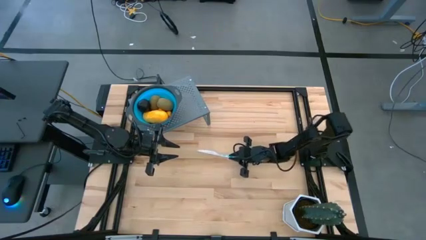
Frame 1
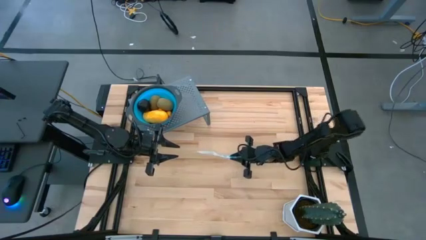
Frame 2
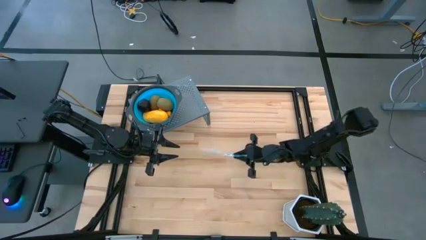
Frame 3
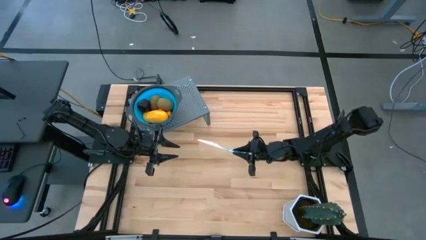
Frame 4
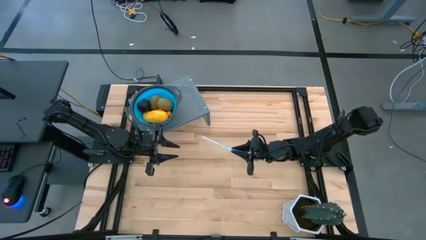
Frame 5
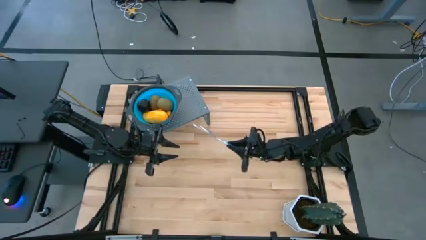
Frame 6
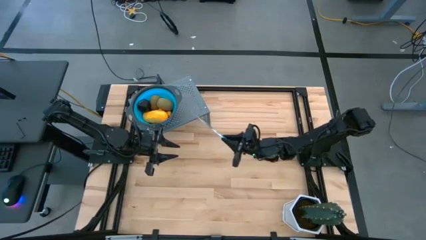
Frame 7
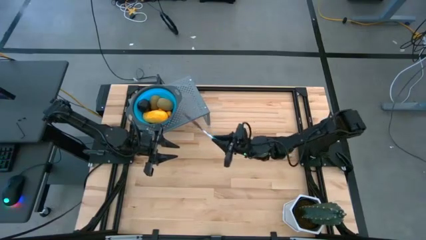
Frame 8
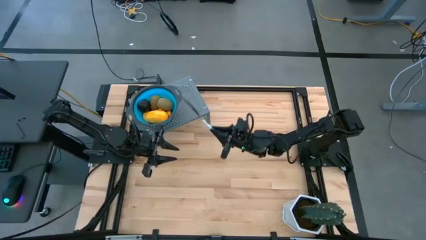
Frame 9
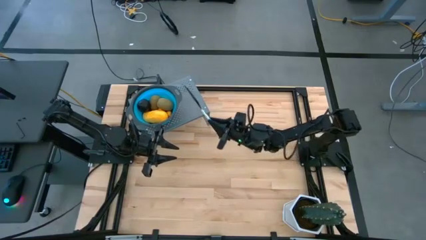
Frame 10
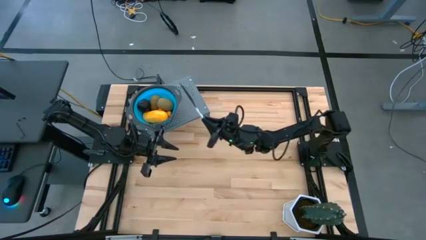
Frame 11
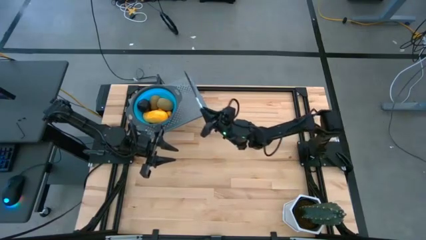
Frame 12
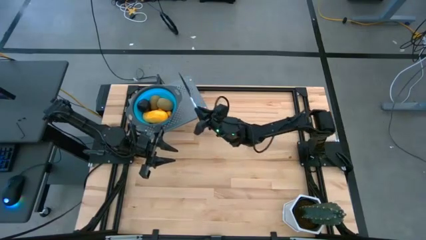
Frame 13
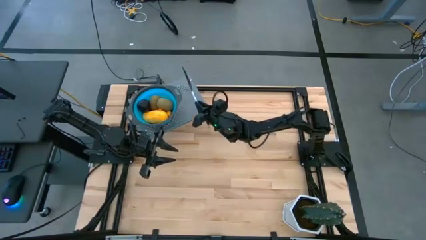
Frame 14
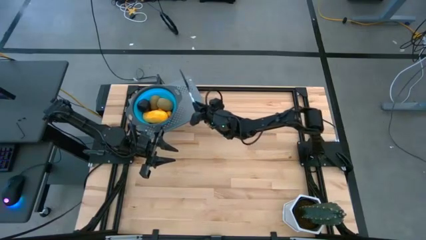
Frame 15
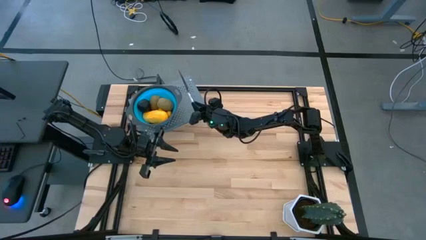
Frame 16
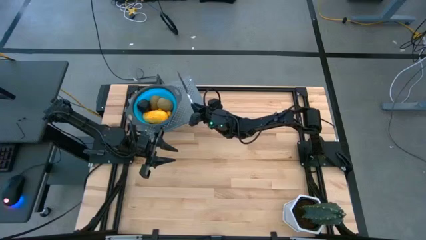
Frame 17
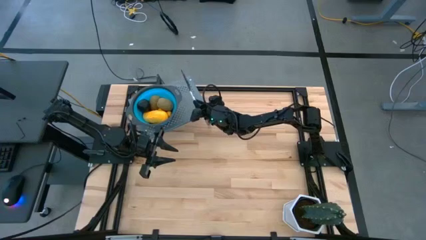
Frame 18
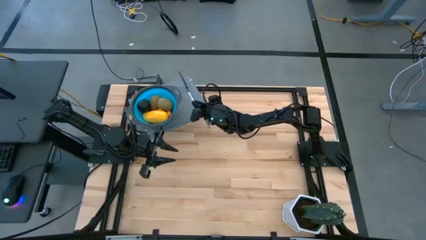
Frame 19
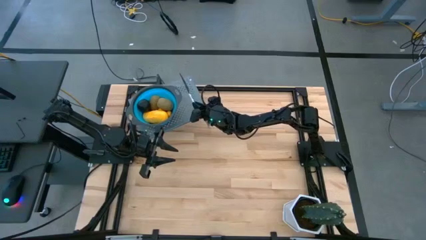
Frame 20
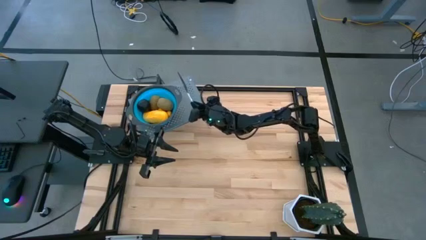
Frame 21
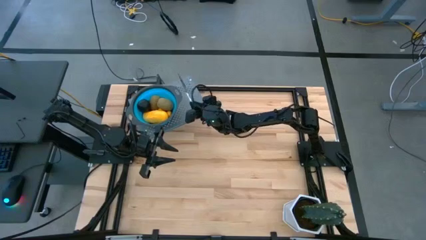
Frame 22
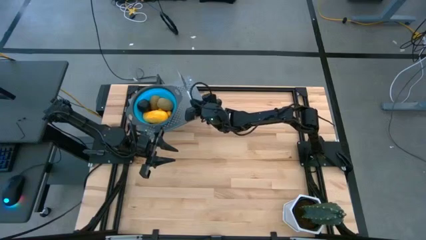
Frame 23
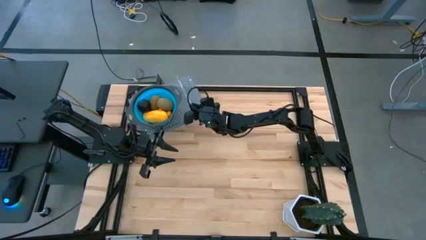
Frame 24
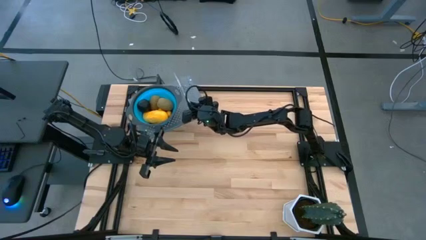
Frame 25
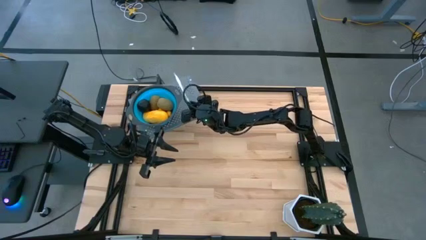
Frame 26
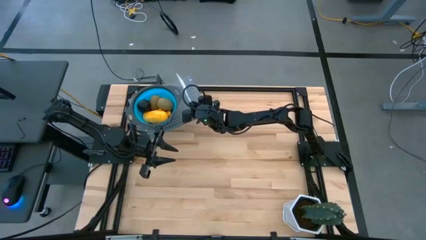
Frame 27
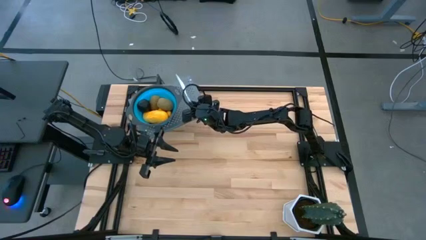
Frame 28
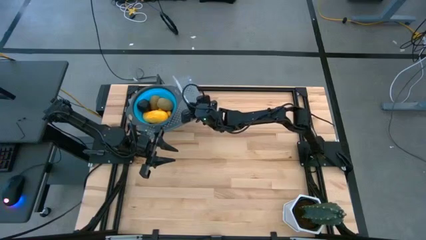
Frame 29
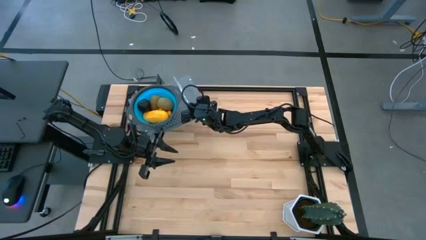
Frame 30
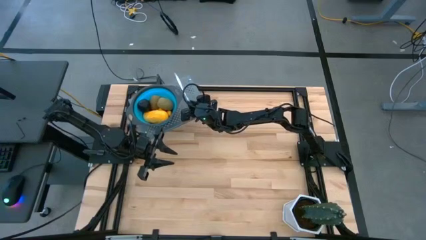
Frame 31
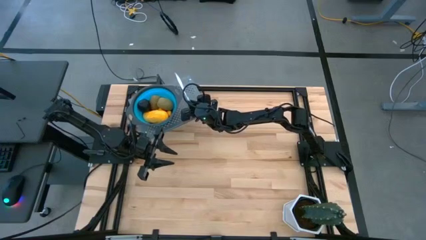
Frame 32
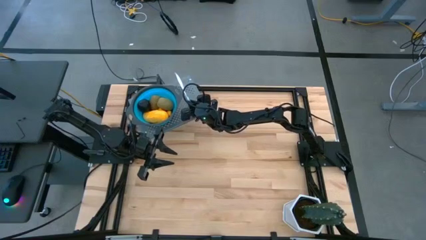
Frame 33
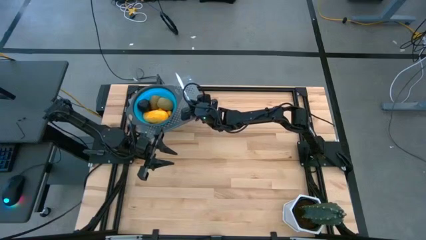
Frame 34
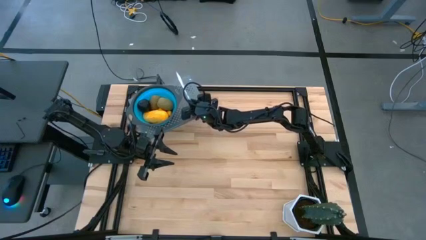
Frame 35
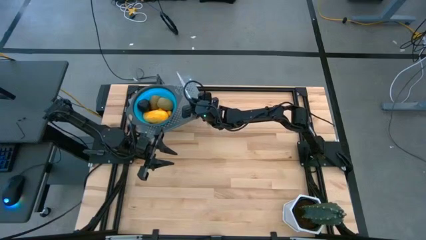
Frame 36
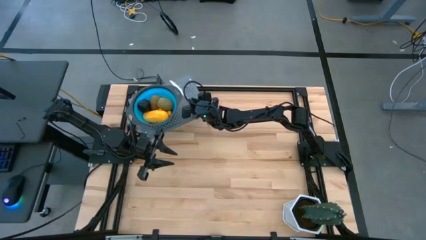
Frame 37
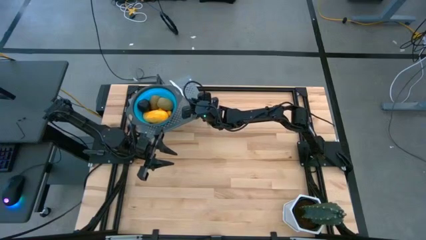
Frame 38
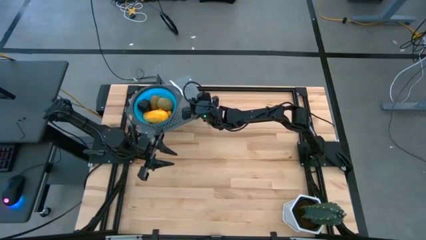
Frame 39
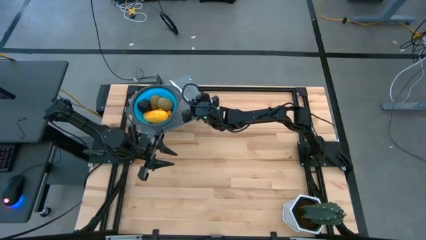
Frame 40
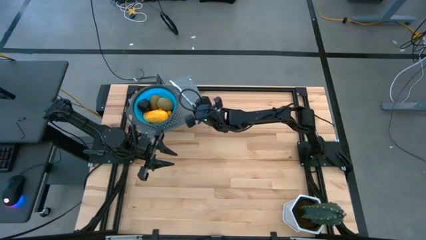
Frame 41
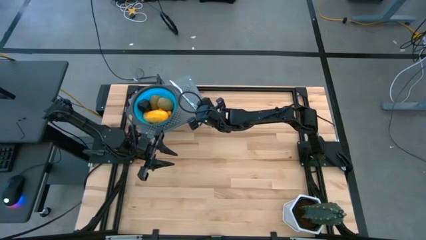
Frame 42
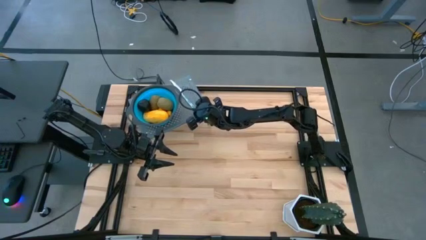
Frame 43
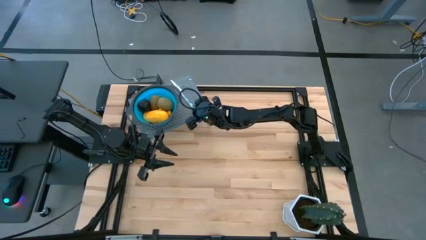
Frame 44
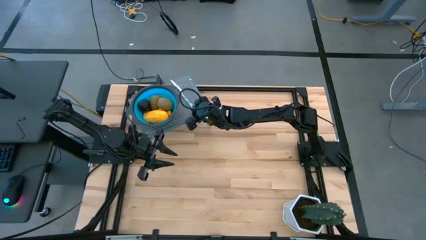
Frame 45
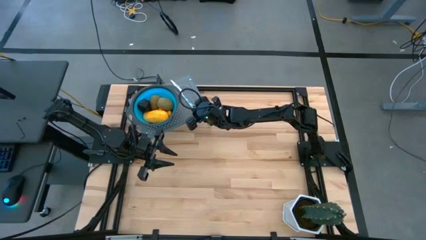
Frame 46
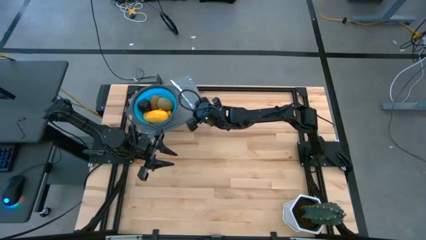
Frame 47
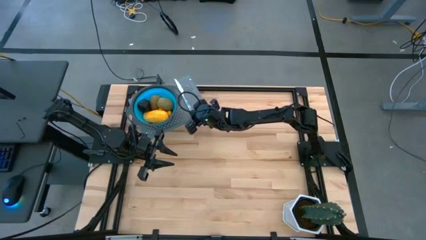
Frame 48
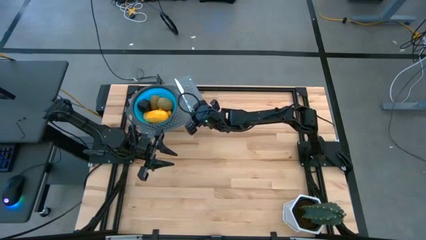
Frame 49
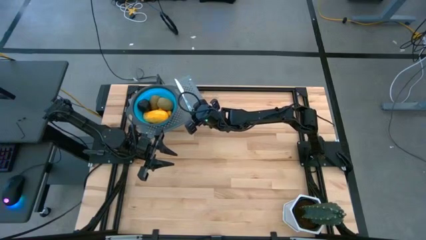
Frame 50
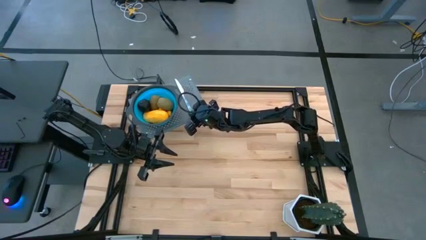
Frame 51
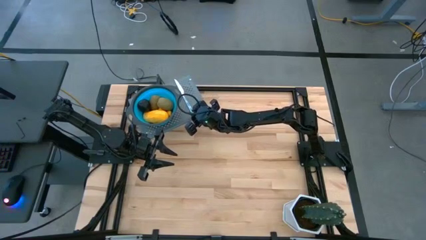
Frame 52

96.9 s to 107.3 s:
Task: Pick & Place Fruit
Put the white knife on the shelf
